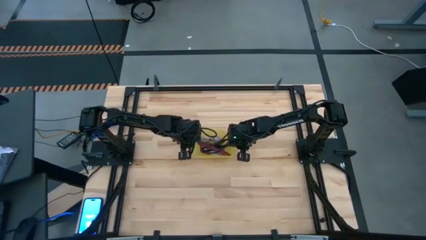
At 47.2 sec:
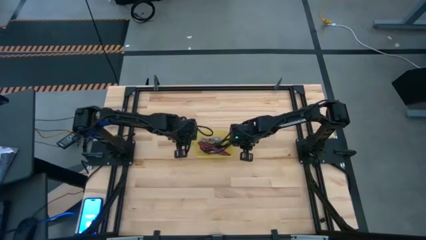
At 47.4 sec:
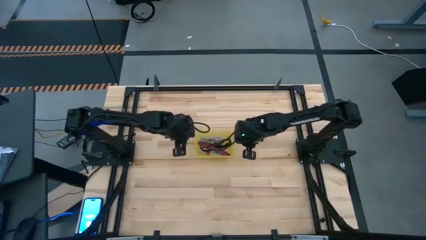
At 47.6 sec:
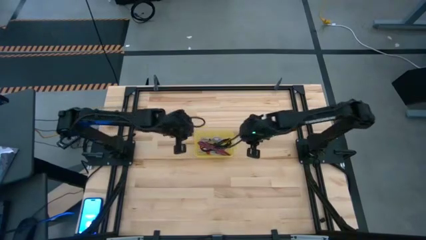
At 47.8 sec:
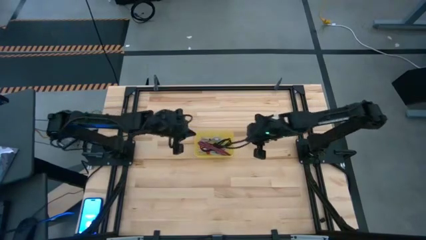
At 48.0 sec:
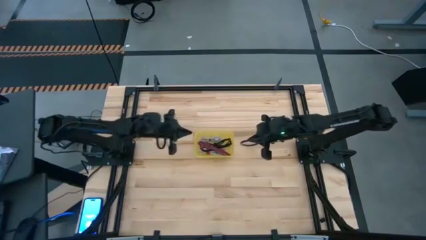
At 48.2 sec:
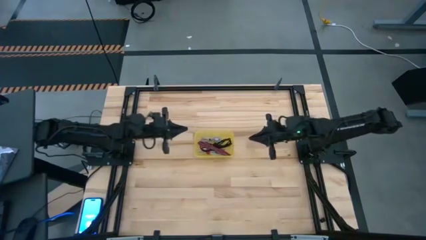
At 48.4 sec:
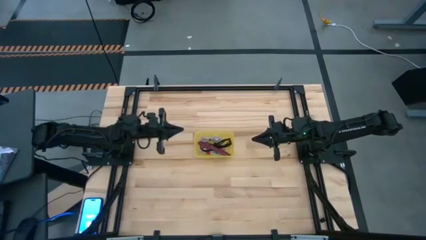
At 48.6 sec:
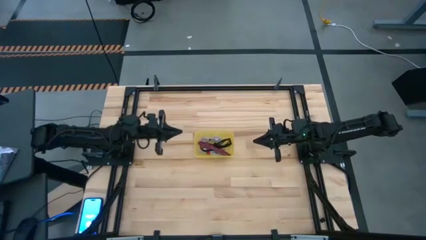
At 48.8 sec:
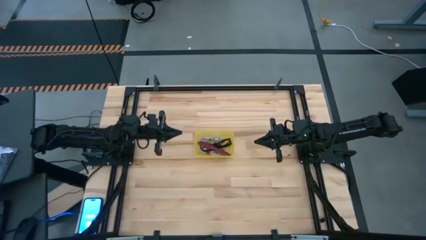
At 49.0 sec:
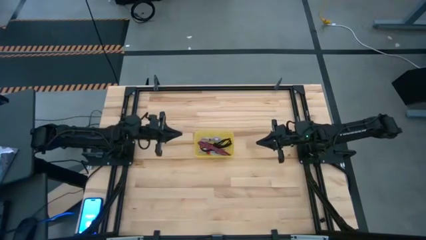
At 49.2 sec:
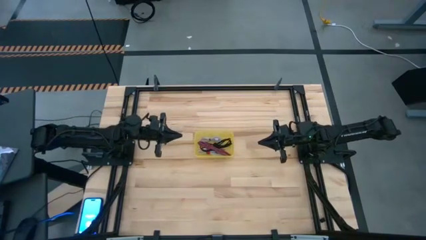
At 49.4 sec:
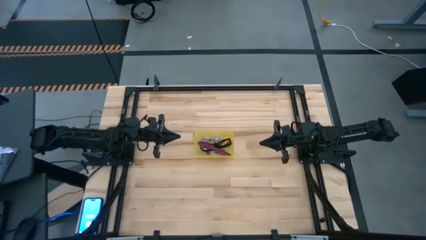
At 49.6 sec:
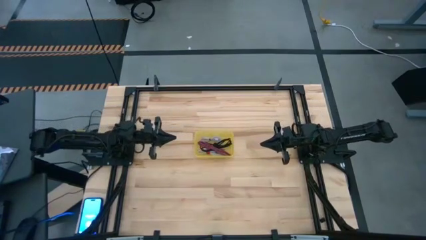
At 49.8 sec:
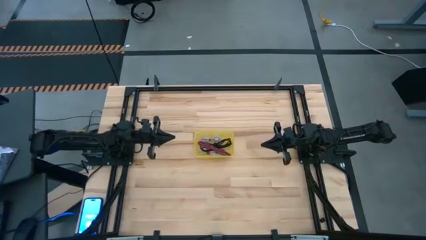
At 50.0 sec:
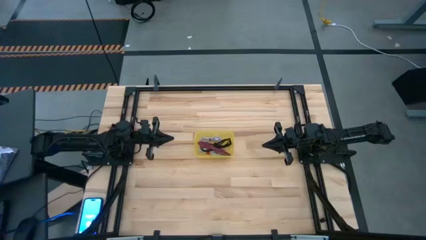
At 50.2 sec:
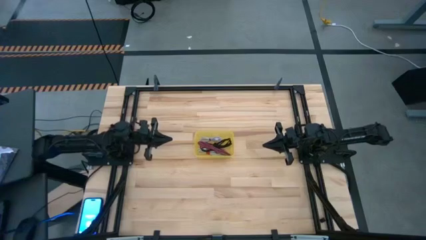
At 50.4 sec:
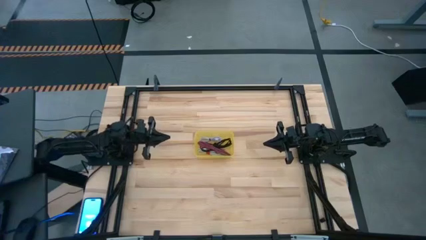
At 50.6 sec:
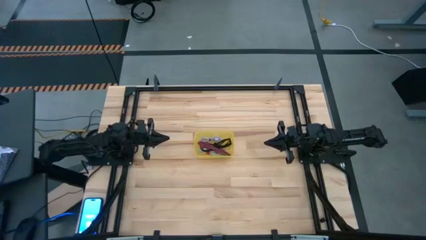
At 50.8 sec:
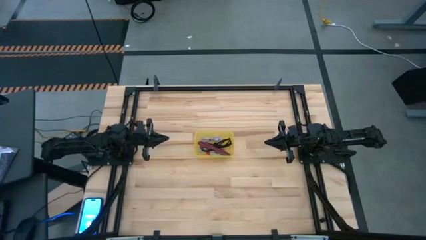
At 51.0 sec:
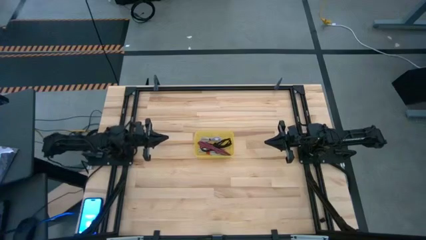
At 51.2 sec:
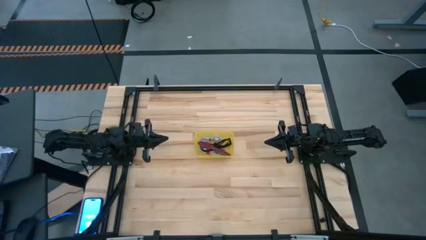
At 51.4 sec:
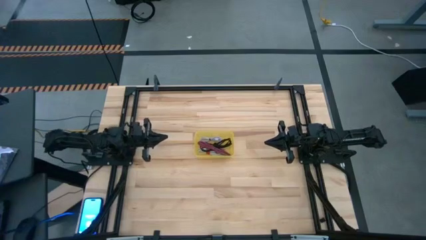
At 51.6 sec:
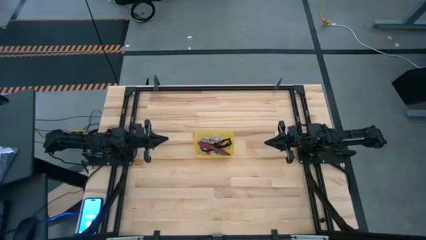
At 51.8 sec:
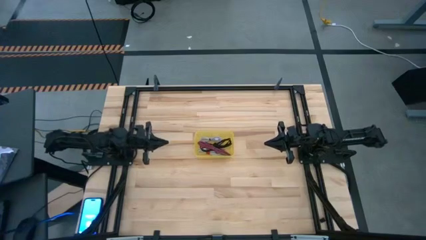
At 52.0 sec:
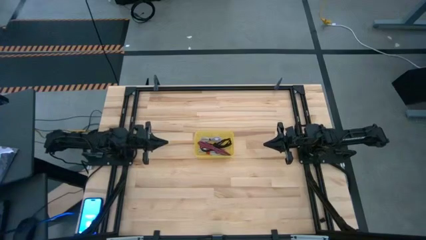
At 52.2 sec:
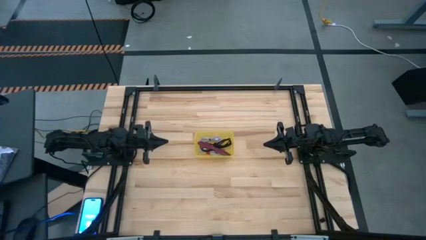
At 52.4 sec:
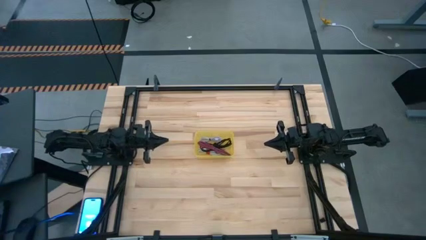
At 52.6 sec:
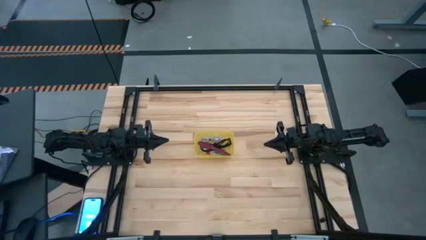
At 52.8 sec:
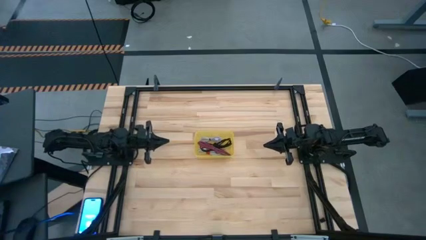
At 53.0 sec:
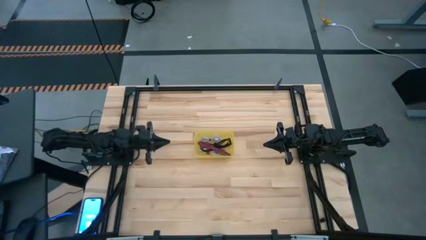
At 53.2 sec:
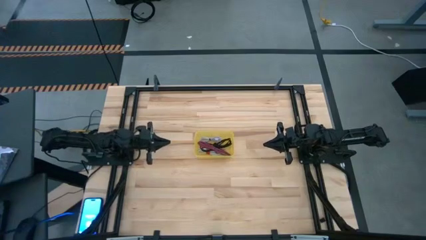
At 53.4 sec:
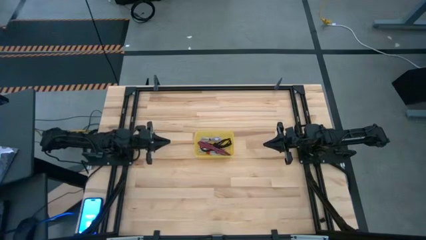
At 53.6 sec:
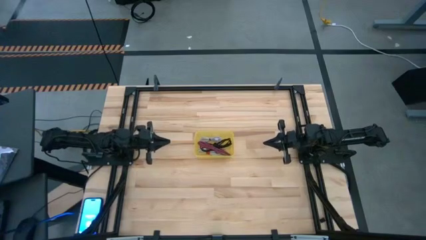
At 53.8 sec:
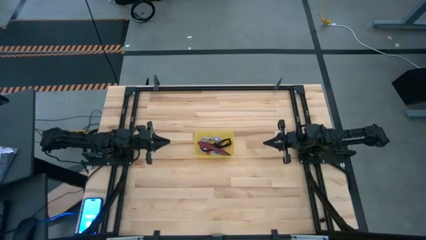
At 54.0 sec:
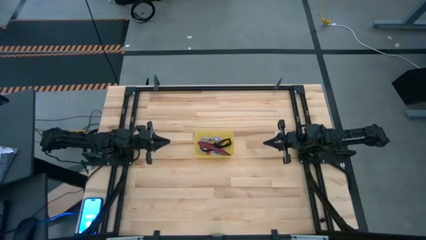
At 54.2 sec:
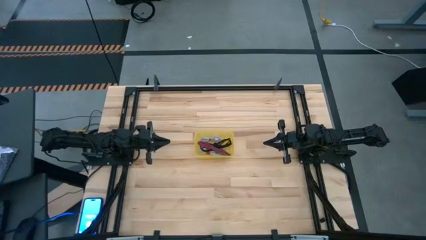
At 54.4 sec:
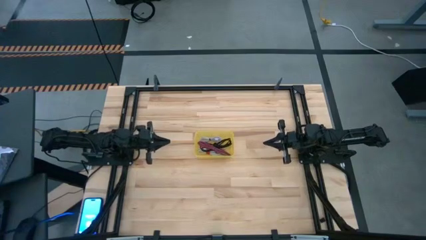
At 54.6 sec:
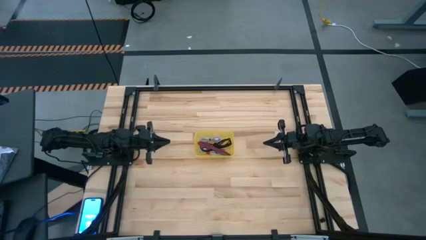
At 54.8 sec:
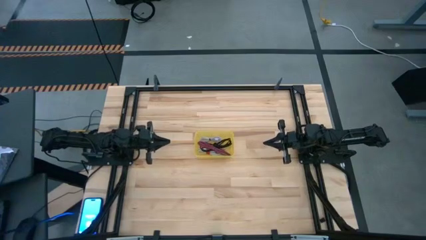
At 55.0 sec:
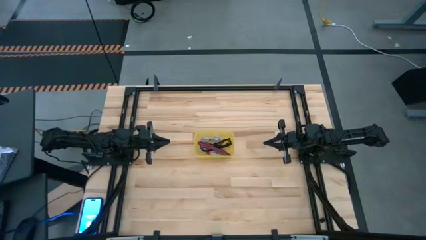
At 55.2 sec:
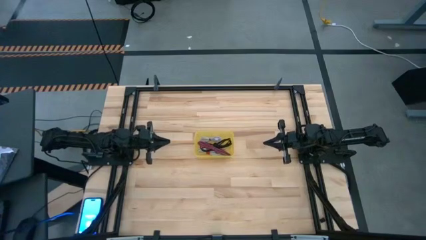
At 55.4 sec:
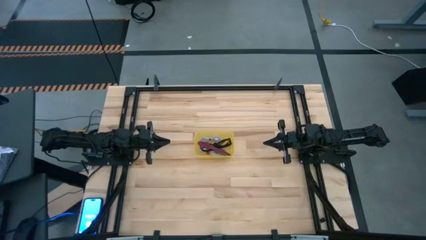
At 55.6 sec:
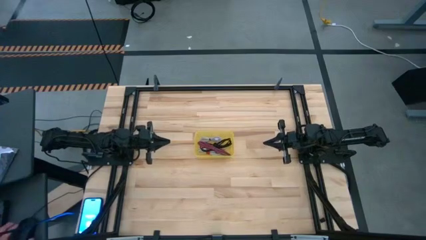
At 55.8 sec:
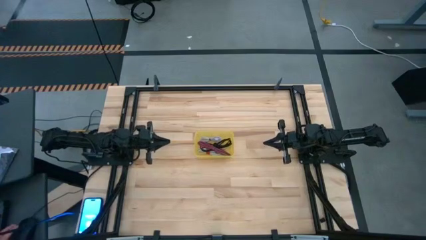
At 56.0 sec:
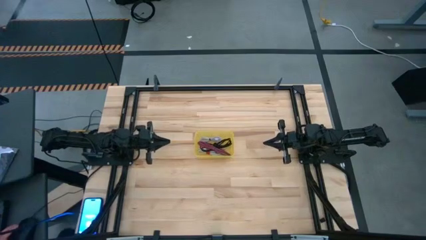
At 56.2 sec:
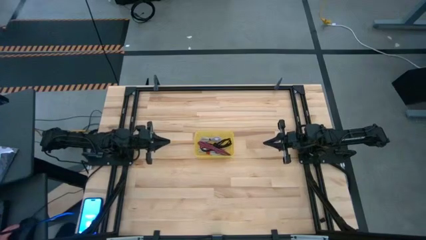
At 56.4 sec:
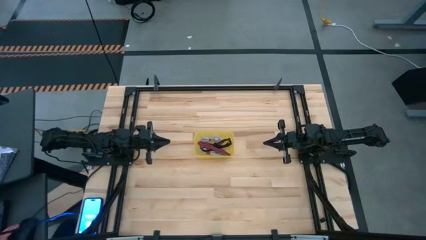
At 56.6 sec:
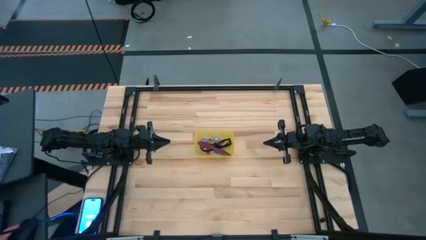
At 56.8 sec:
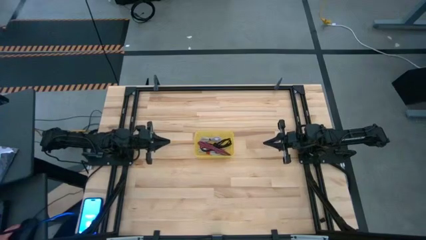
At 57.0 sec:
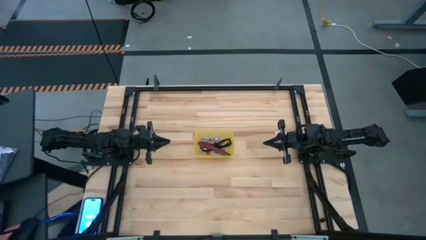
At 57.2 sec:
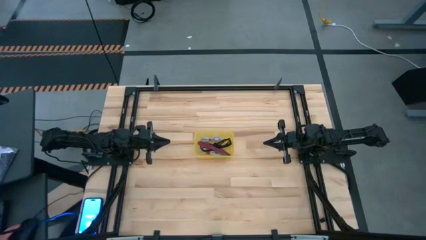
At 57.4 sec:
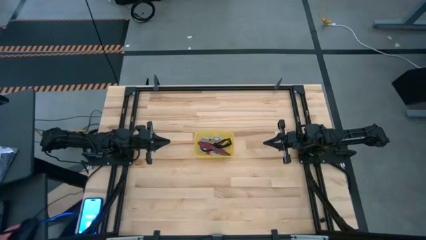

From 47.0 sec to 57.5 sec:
Task: Pick and place USB-C Cables
Return to Home Position
